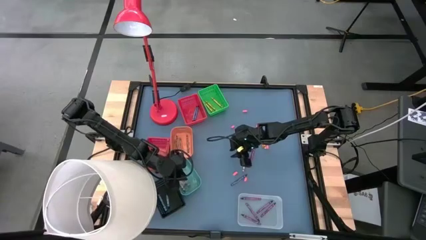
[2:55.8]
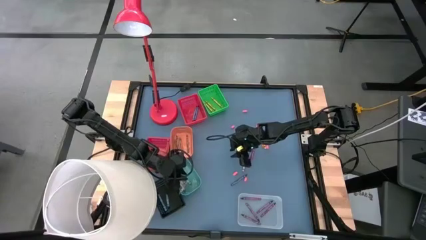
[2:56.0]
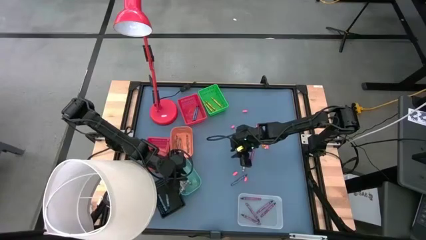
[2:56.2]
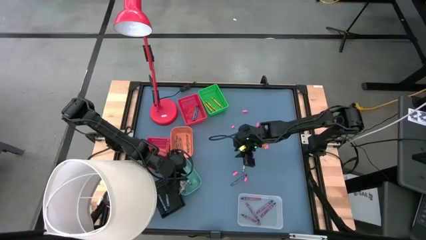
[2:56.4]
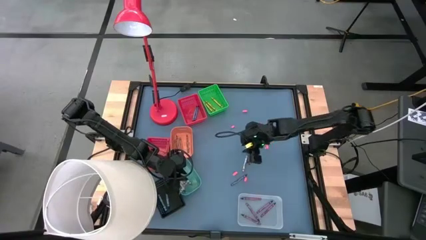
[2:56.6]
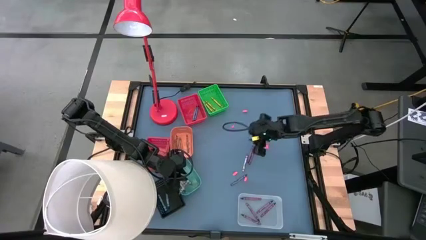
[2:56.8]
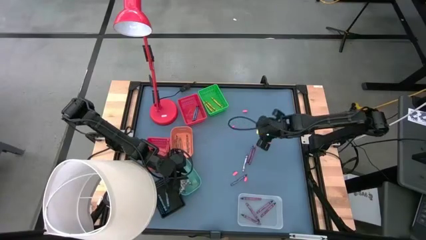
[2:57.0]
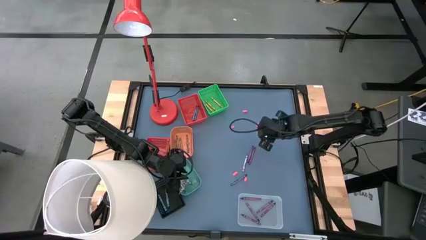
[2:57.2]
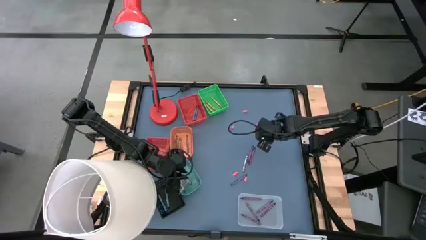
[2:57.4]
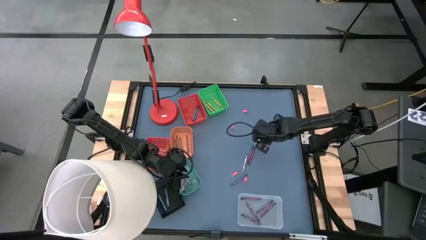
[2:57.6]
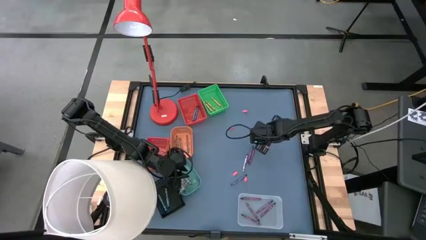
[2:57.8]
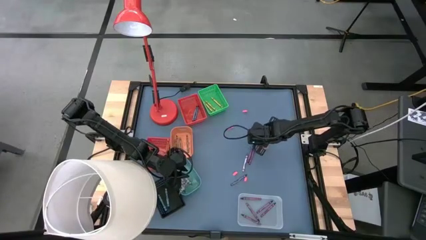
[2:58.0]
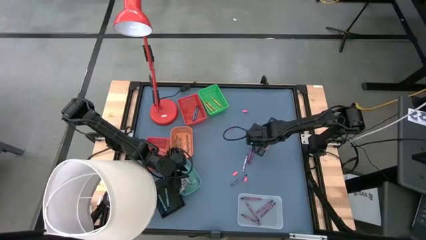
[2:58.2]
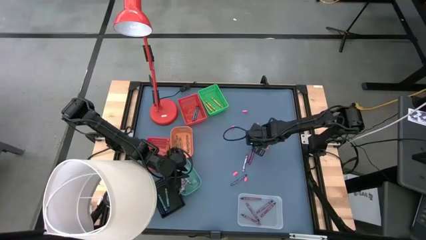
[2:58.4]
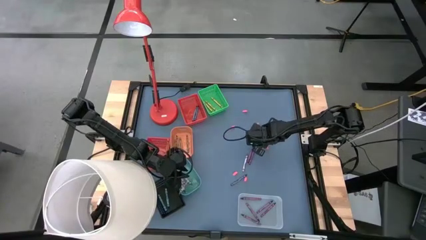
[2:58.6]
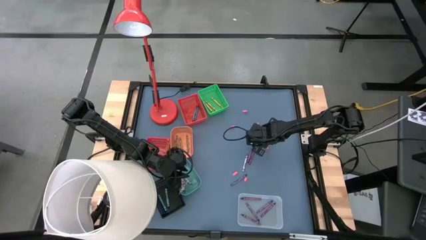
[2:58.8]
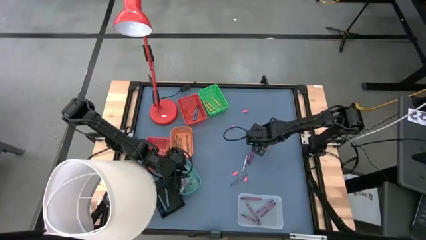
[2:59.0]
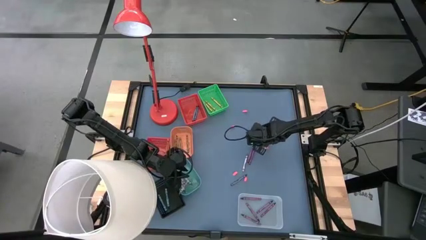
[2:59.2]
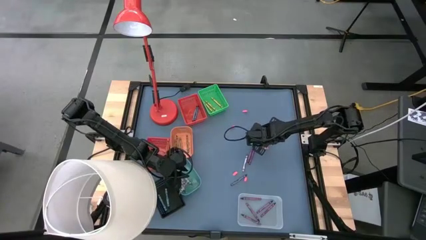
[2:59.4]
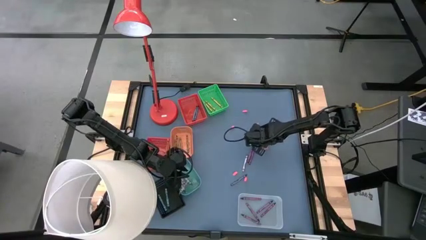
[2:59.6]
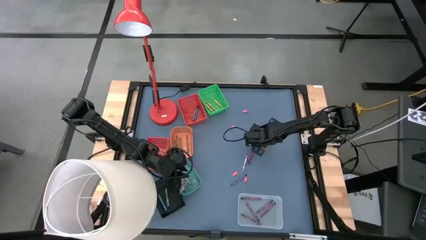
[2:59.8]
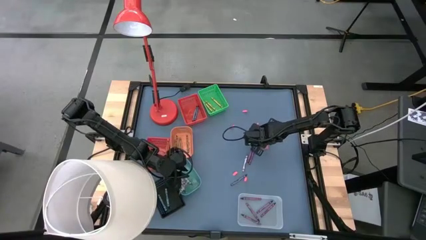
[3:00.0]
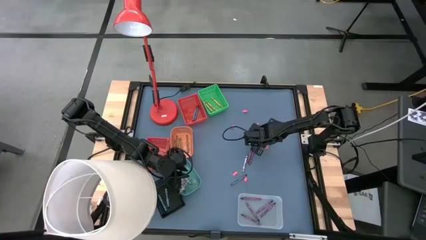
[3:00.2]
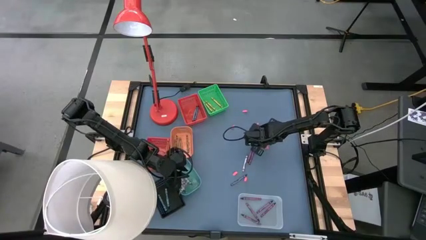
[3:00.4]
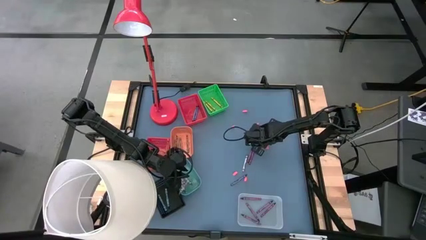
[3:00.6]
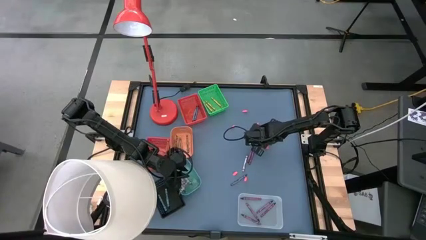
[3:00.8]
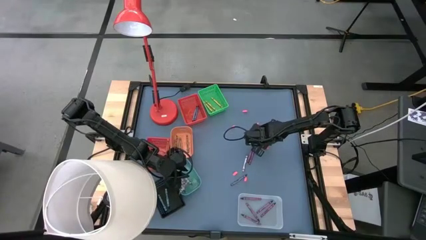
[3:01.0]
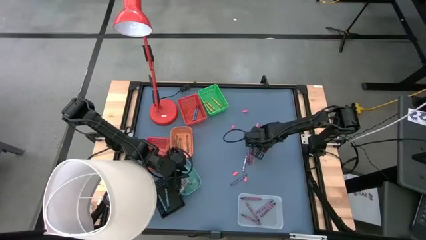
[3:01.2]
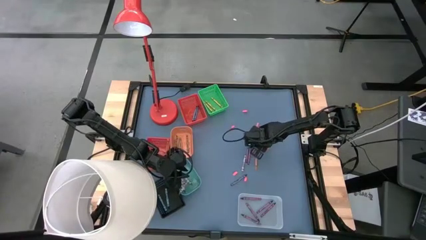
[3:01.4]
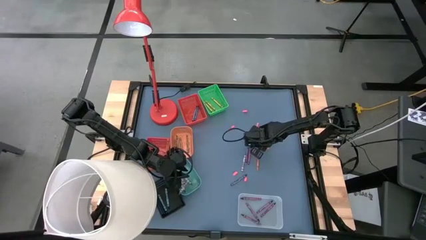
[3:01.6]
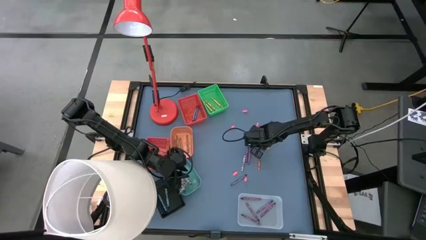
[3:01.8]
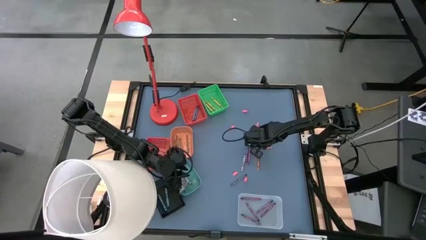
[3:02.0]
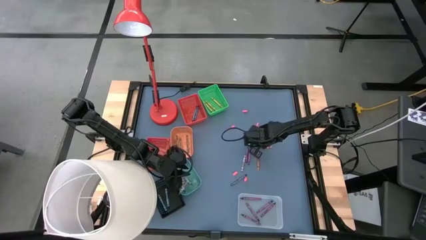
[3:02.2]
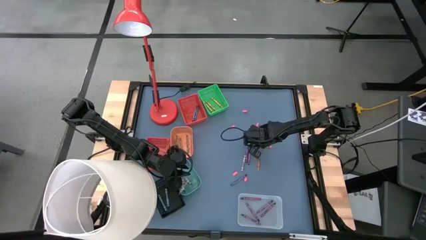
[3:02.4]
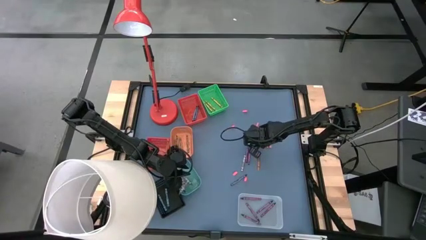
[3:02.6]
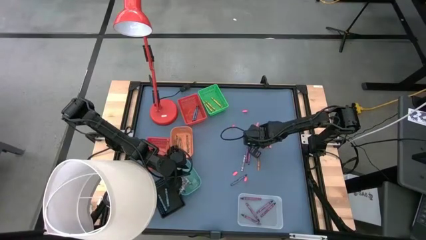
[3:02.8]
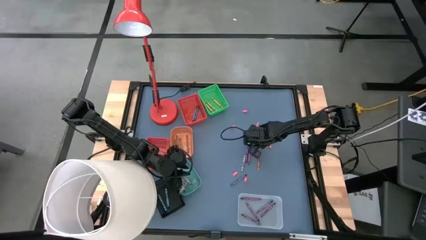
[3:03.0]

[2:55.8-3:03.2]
Task: Sort crayons
Put the yellow crayon into the green basket

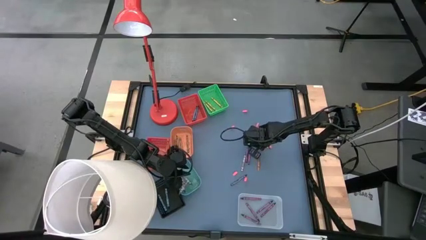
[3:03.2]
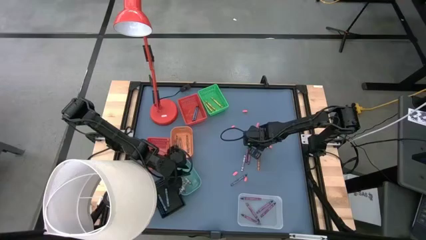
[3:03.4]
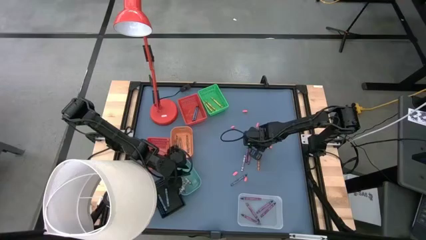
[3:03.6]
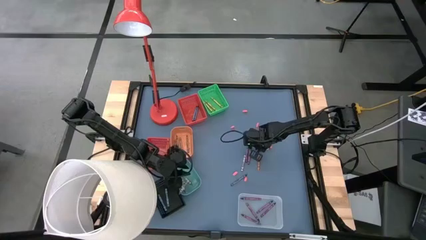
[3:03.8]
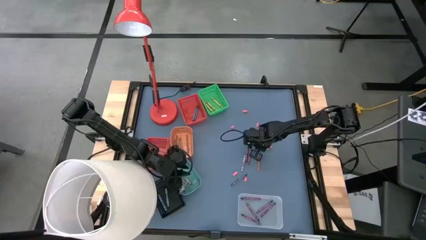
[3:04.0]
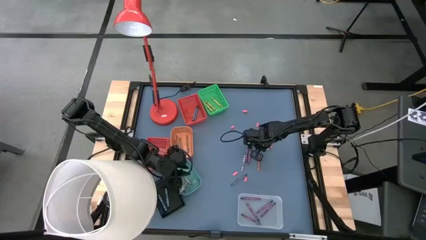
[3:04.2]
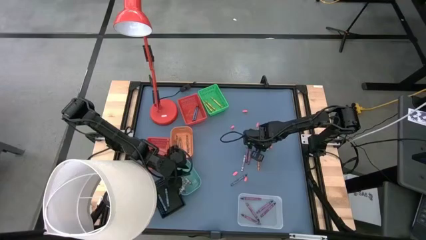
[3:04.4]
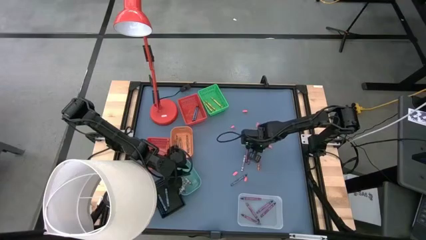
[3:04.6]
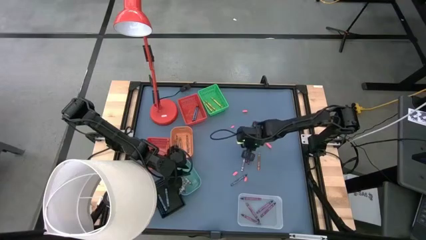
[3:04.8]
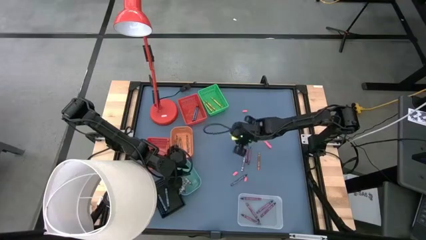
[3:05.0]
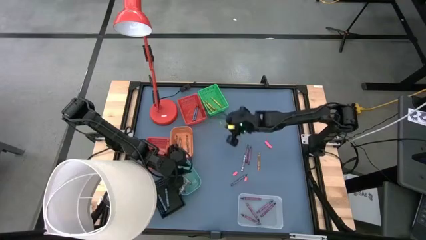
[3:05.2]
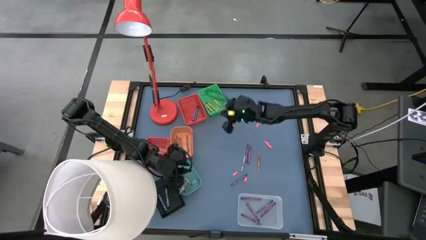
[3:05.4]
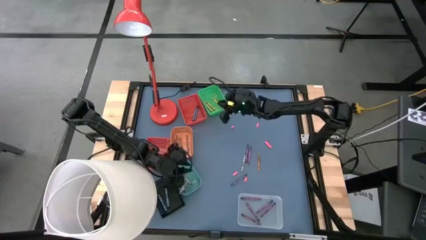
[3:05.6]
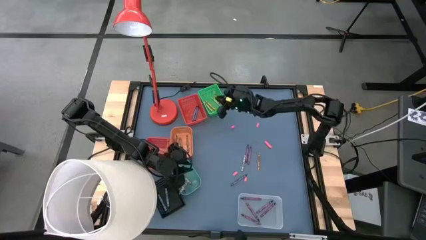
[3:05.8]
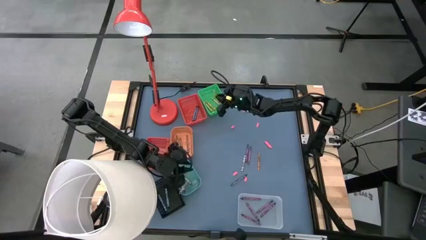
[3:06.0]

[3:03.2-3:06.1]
Put the yellow crayon into the green basket

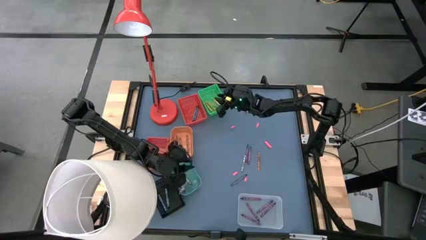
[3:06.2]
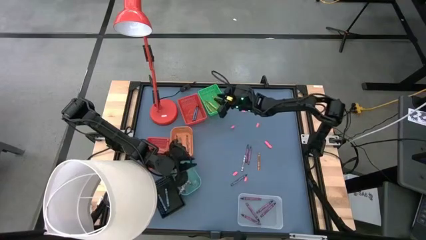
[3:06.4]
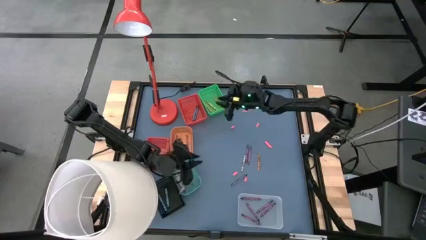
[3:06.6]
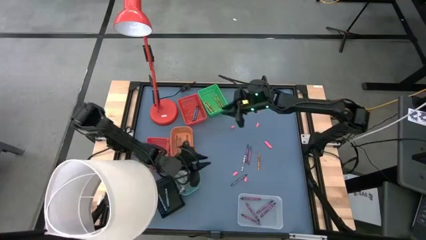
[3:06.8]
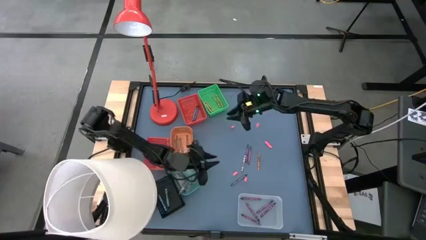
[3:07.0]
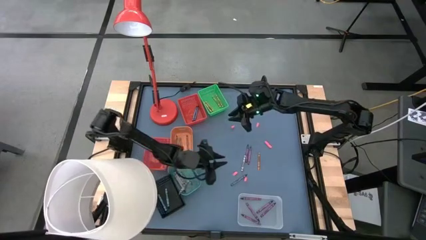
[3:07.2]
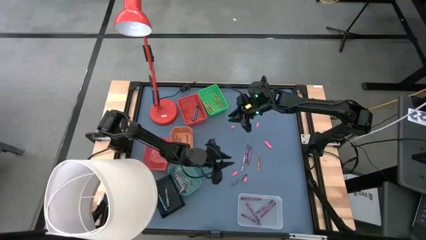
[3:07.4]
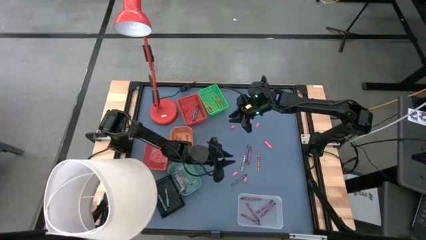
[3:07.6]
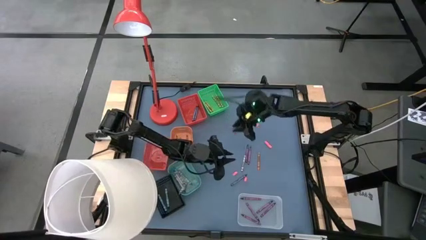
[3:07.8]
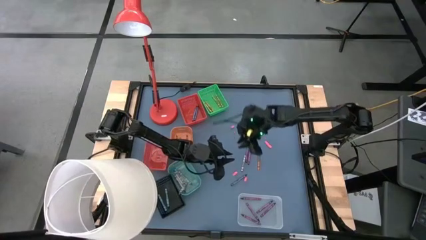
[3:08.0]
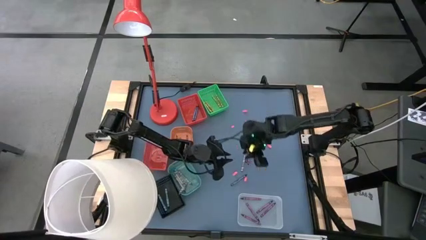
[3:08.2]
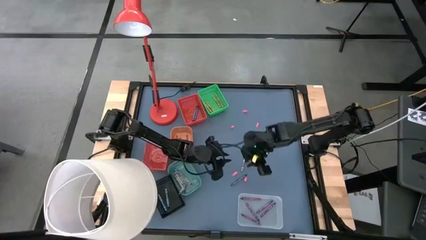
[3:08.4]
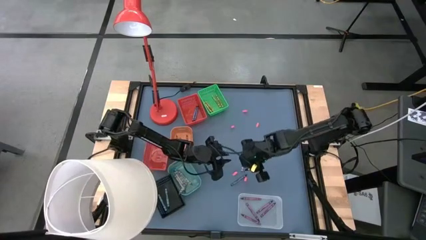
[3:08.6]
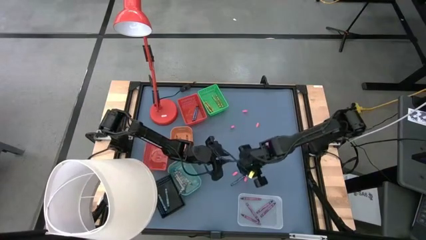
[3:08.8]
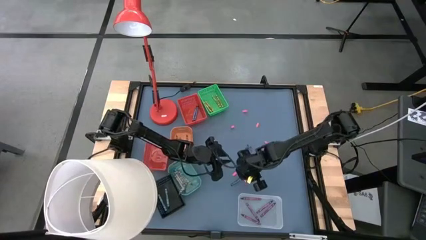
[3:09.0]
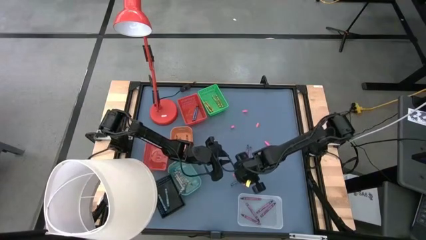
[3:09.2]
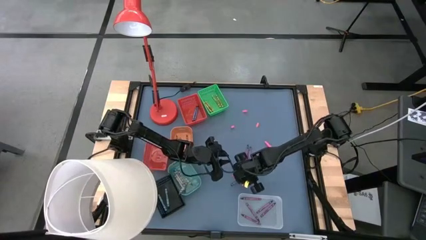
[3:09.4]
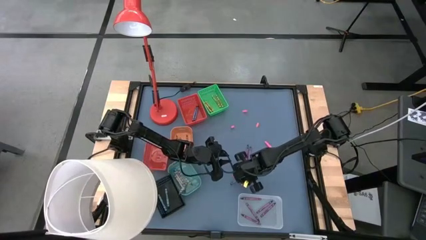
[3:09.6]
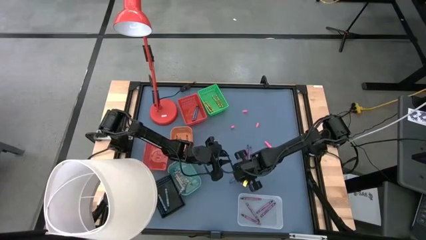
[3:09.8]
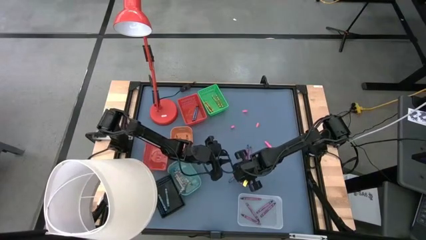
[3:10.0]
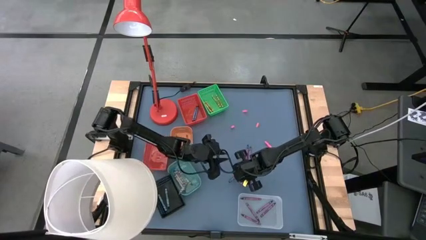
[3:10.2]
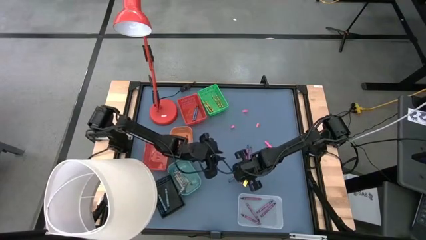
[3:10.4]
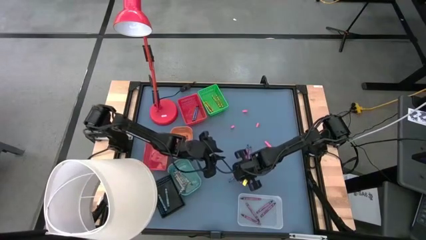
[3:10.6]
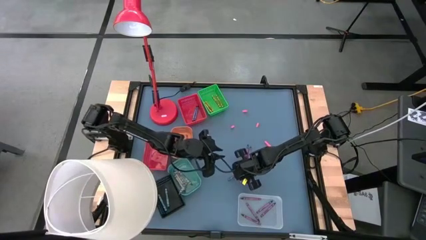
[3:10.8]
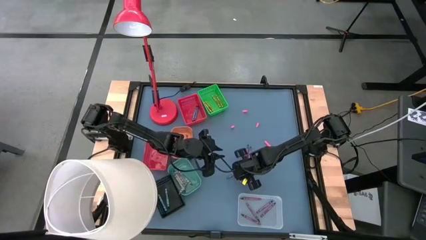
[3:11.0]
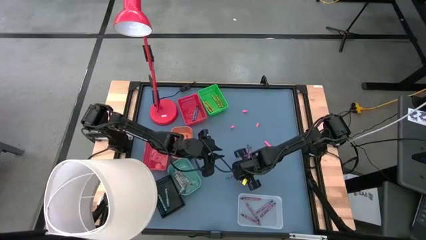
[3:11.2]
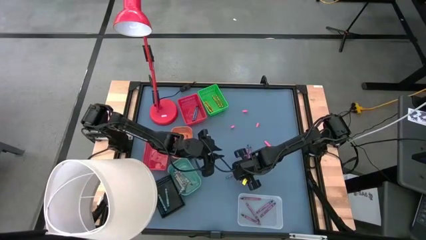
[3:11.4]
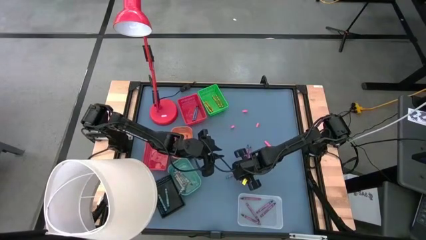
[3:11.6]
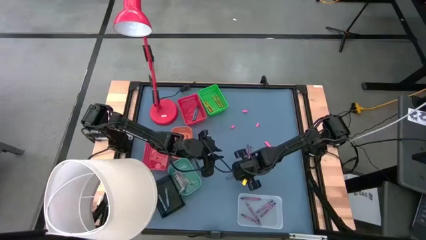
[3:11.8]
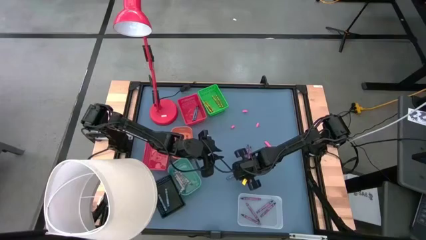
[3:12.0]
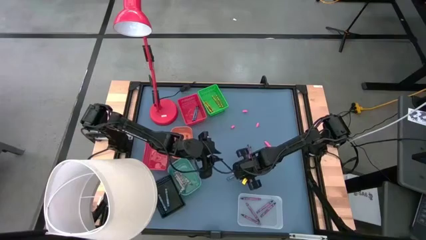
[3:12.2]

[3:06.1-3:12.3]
Put the blue crayon into the right red basket

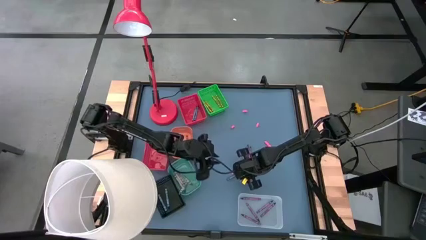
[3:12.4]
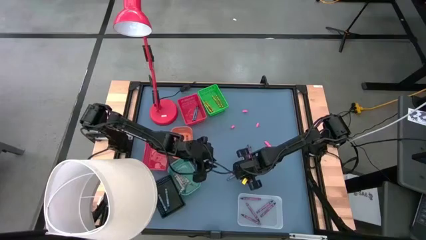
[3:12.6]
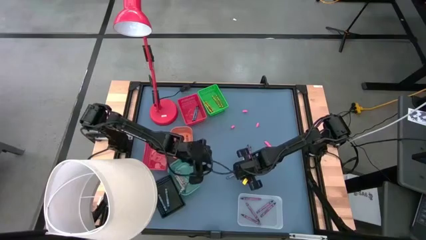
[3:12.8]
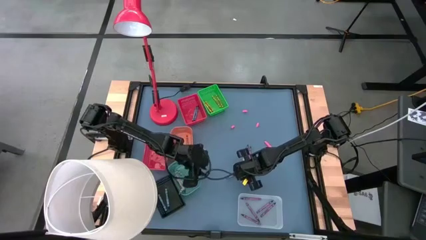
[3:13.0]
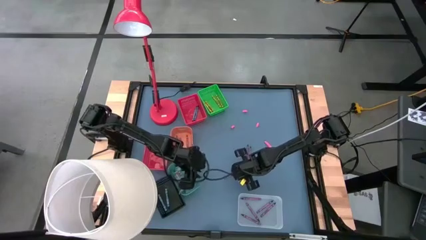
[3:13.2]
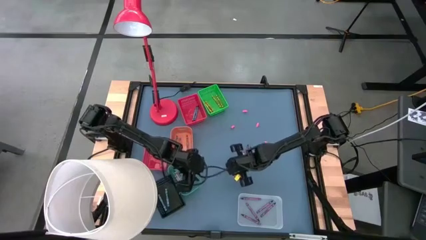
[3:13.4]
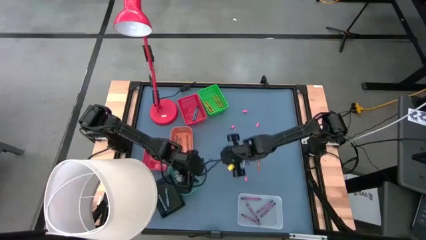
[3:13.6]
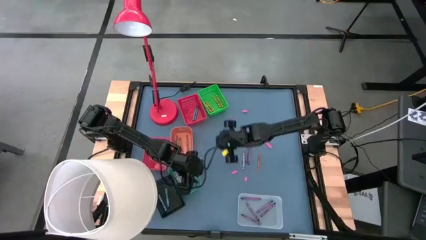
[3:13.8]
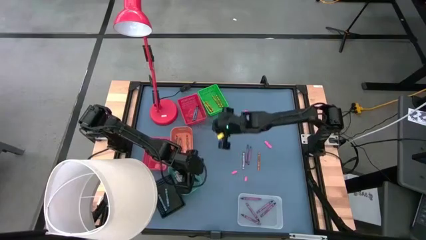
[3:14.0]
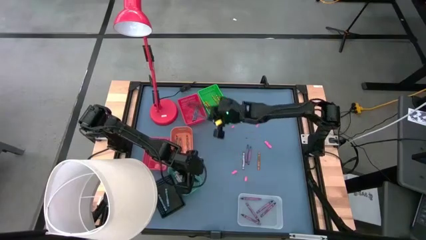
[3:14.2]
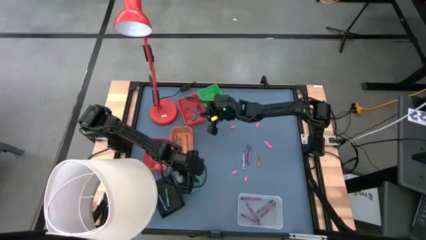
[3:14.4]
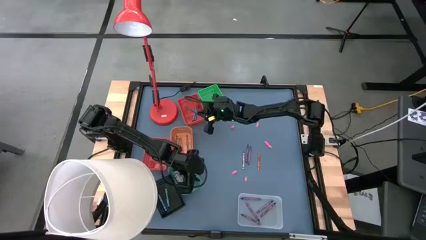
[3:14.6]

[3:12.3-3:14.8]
Put the blue crayon into the right red basket
